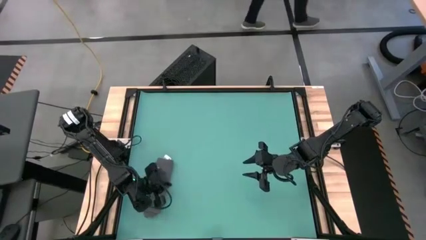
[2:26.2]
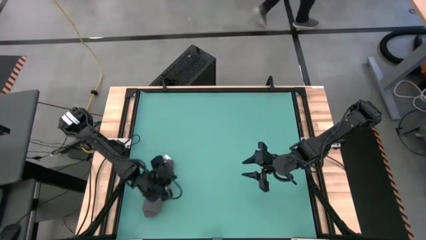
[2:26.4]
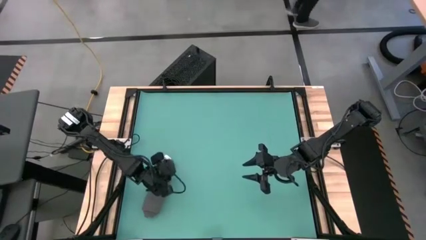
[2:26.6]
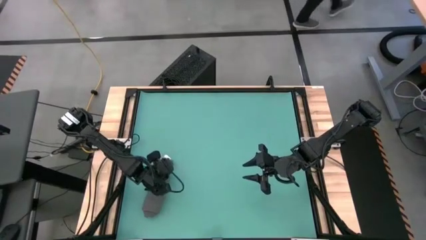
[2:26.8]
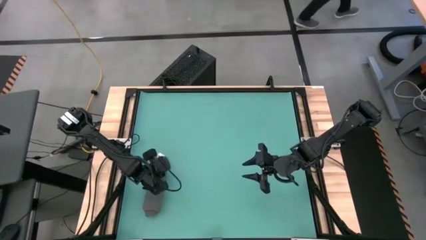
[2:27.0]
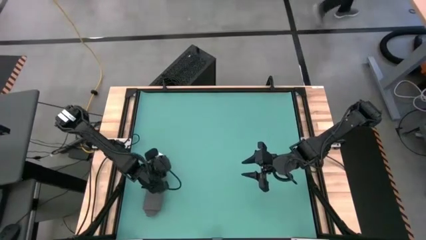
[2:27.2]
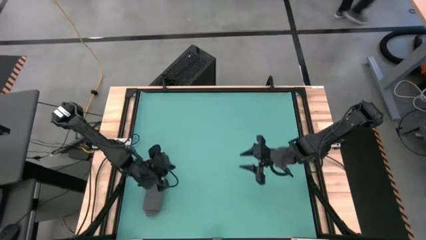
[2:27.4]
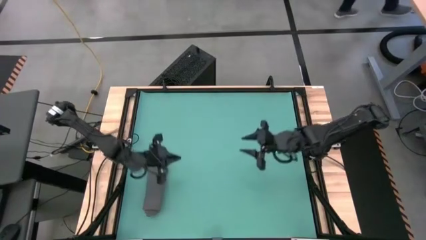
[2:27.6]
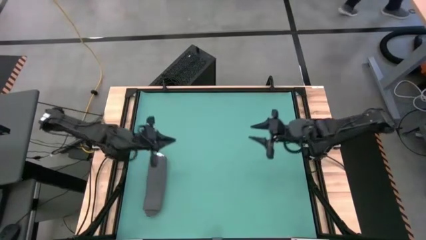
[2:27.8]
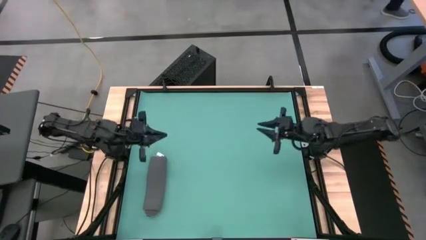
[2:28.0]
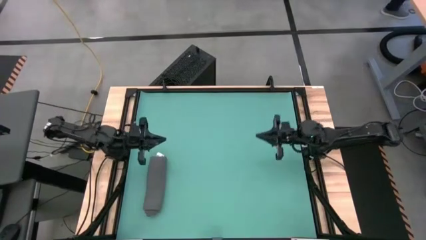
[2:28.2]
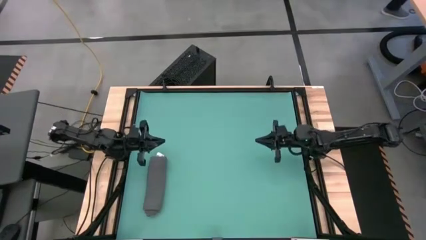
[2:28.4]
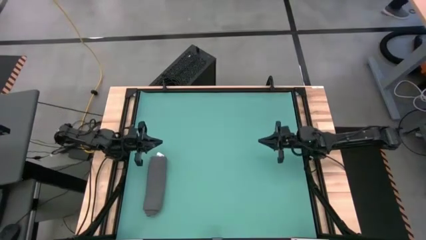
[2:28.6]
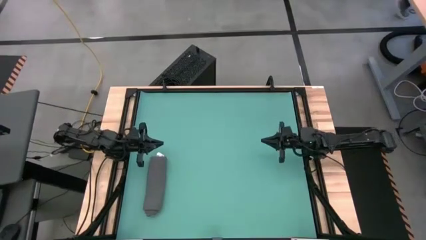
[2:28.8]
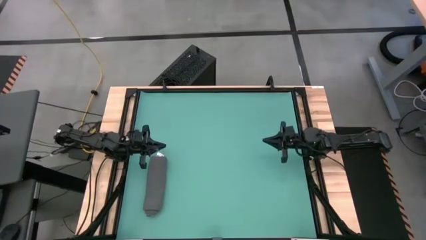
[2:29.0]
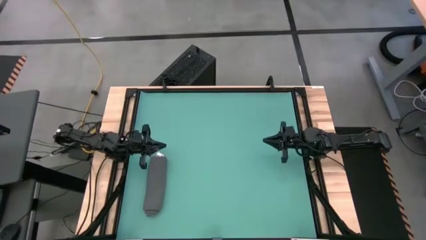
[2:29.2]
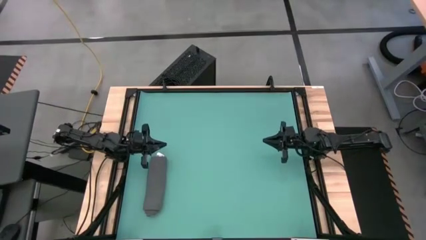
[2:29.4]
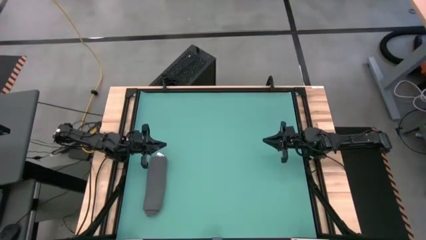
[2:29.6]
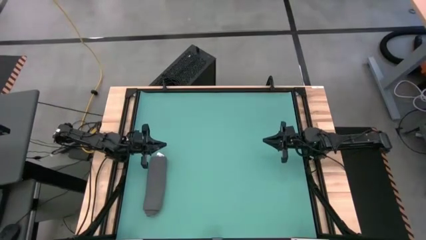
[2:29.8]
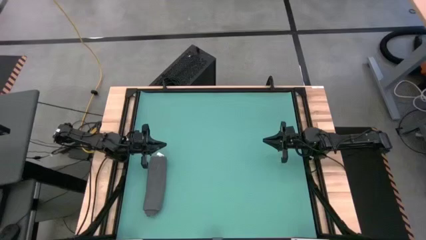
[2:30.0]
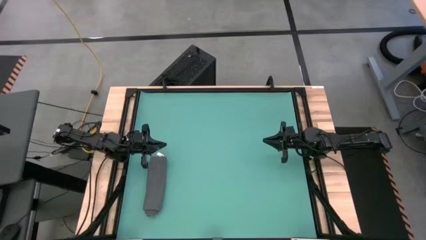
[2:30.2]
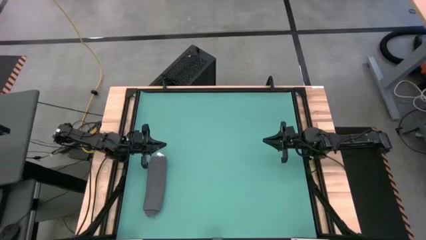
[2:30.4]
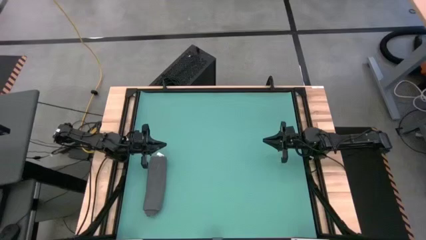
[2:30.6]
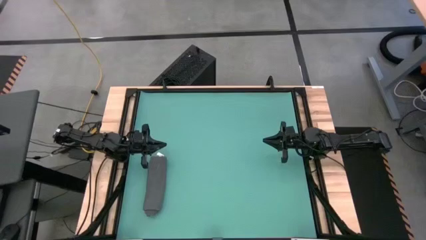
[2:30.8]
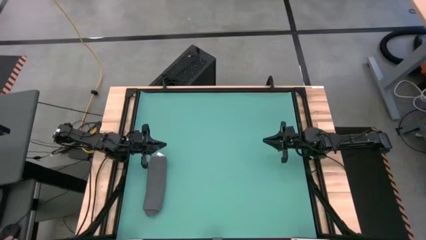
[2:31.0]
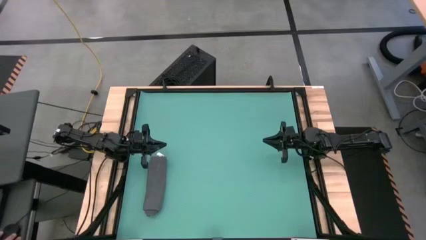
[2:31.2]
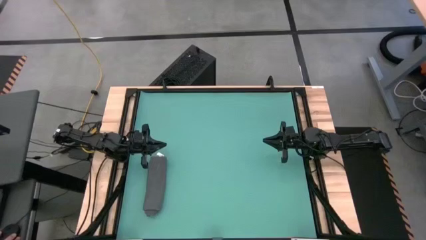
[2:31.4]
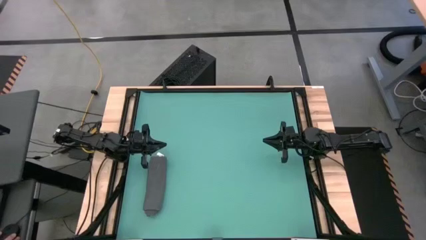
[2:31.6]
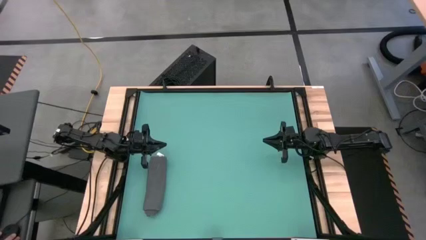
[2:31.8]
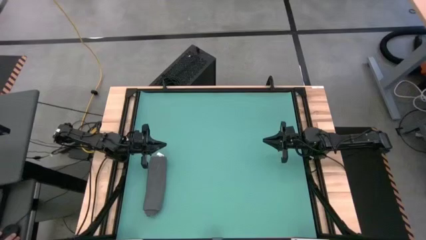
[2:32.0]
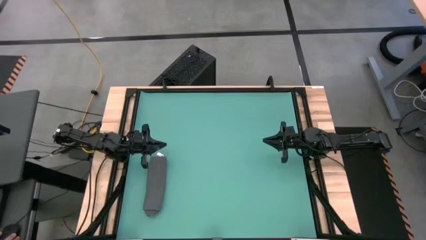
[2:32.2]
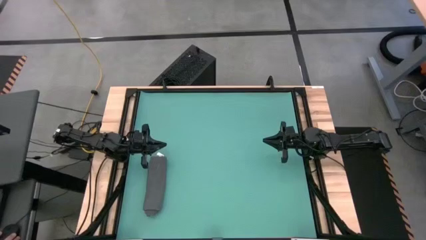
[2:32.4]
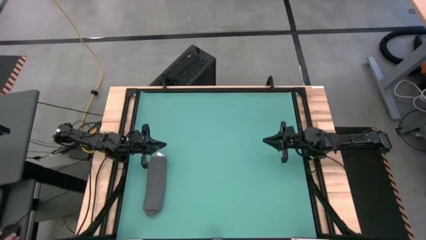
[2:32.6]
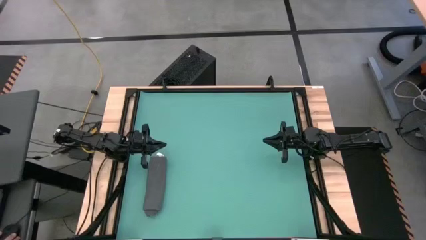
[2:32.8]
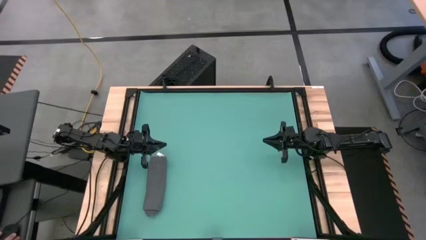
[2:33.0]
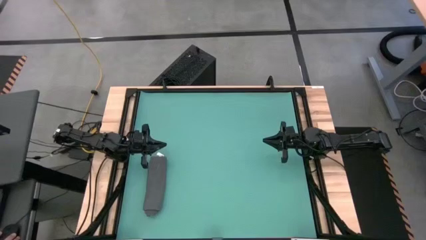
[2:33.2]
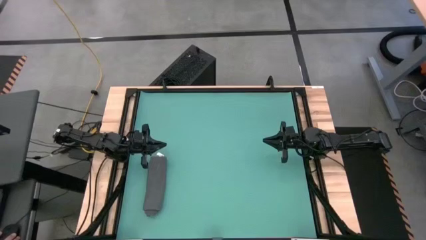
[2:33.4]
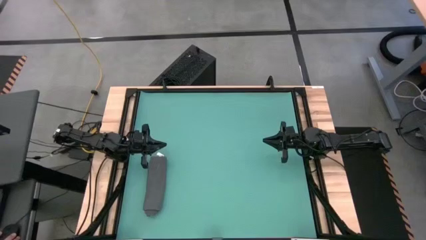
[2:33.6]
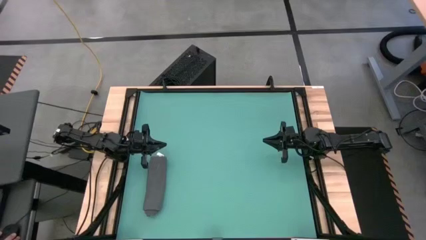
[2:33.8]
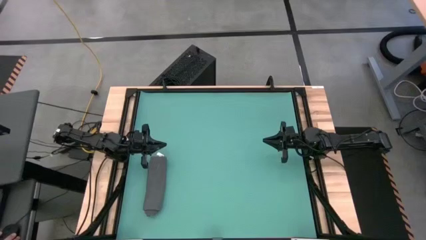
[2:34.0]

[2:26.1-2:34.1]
Task: Roll towel into tight, uniform cylinder
Return to Home Position

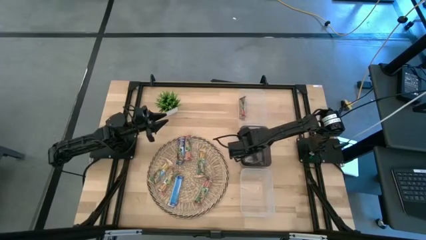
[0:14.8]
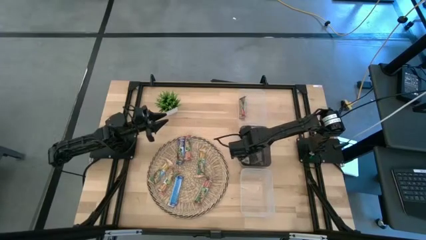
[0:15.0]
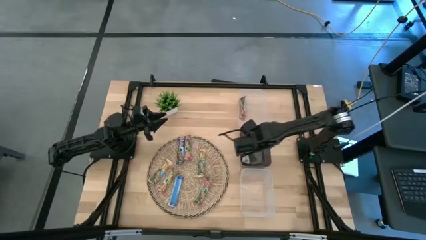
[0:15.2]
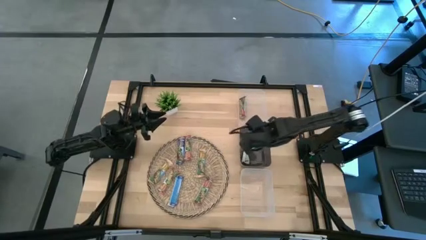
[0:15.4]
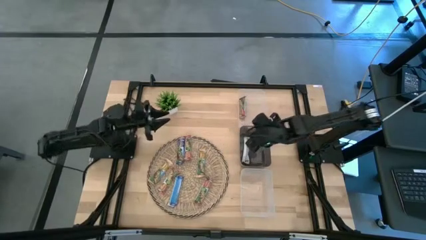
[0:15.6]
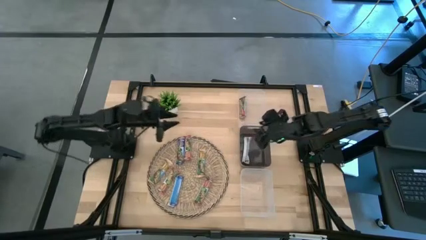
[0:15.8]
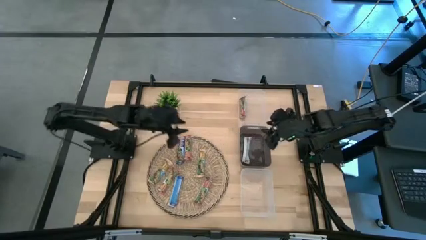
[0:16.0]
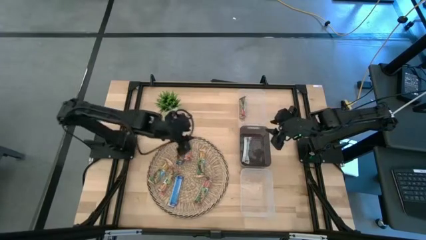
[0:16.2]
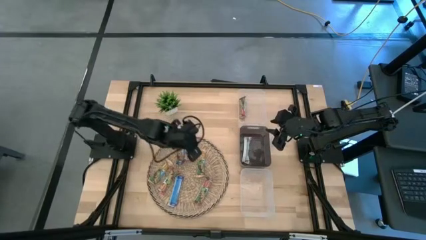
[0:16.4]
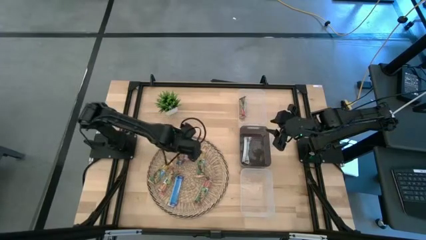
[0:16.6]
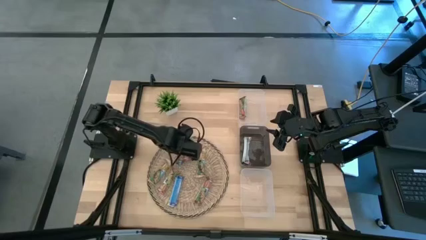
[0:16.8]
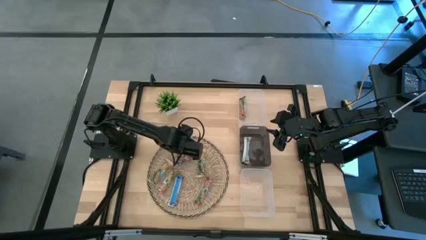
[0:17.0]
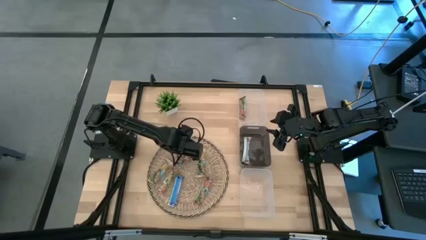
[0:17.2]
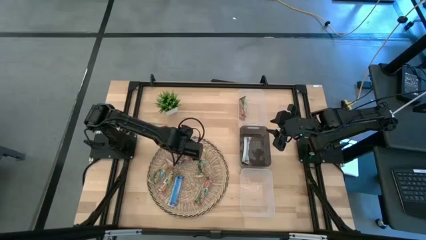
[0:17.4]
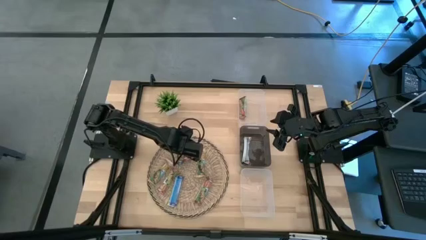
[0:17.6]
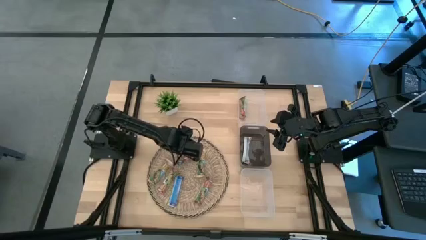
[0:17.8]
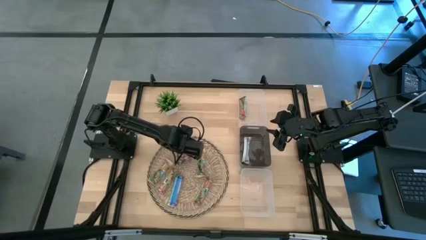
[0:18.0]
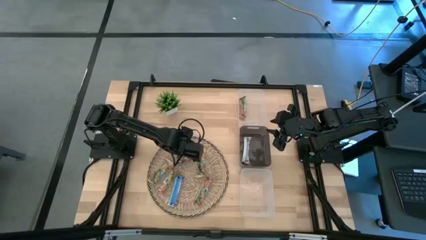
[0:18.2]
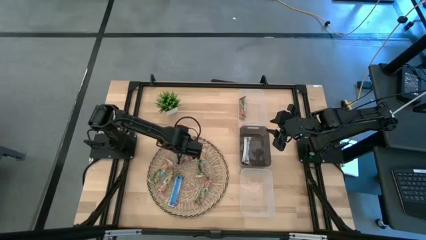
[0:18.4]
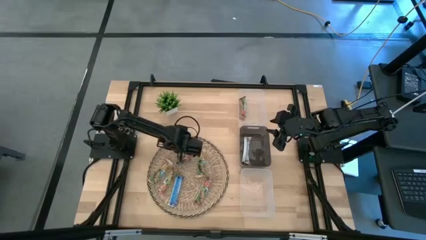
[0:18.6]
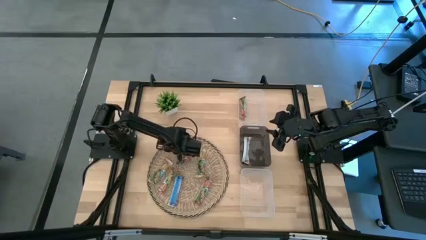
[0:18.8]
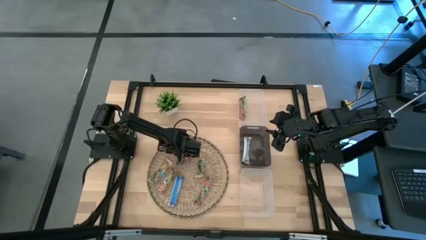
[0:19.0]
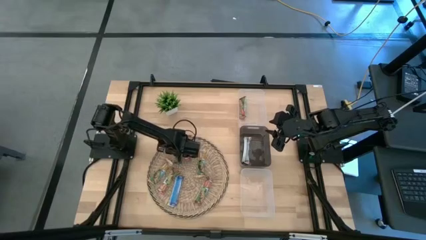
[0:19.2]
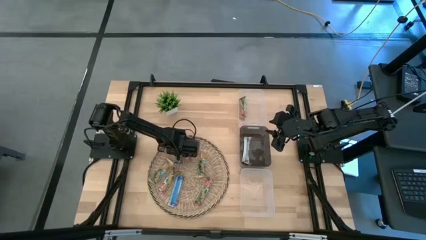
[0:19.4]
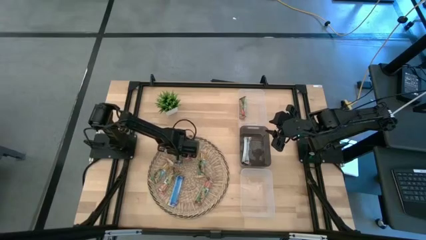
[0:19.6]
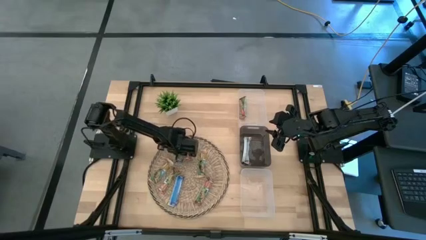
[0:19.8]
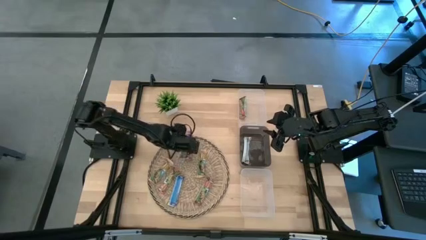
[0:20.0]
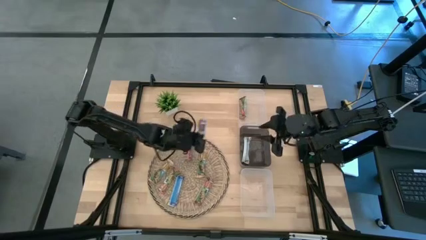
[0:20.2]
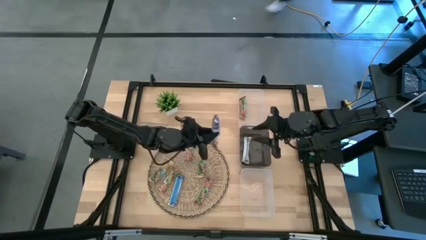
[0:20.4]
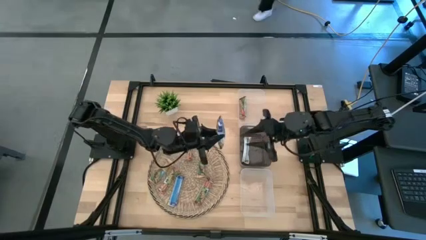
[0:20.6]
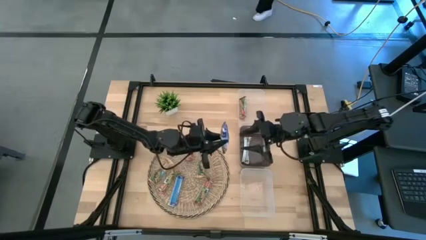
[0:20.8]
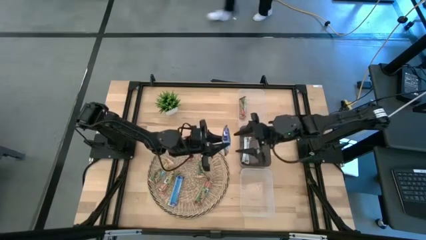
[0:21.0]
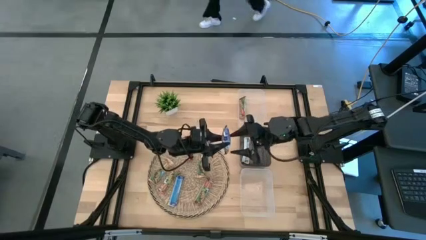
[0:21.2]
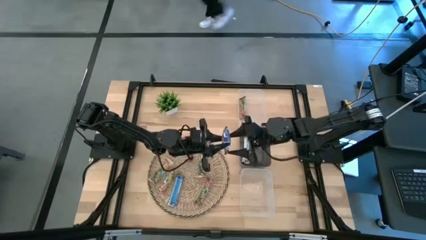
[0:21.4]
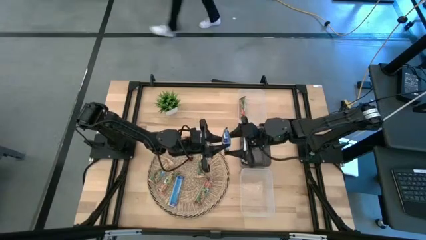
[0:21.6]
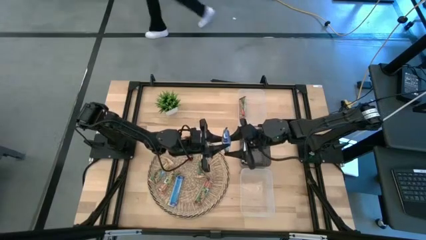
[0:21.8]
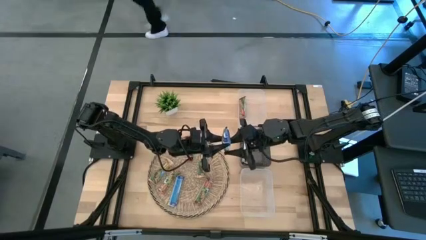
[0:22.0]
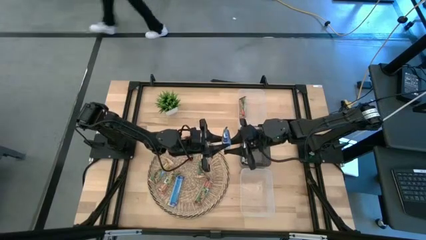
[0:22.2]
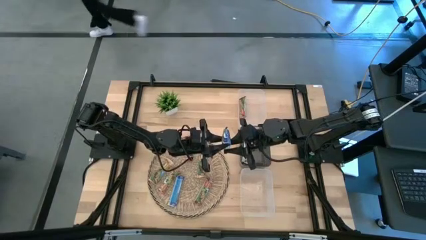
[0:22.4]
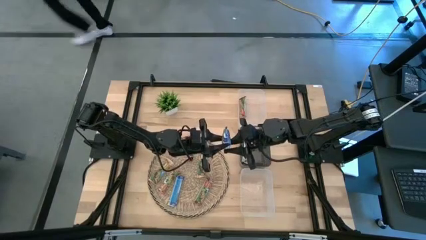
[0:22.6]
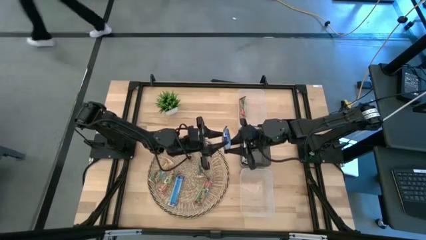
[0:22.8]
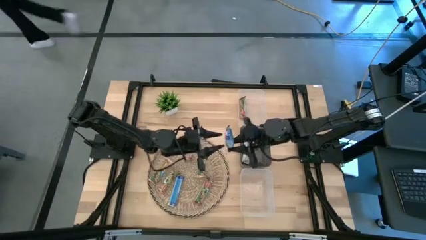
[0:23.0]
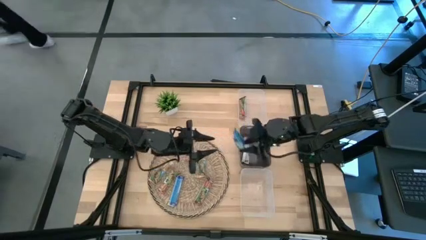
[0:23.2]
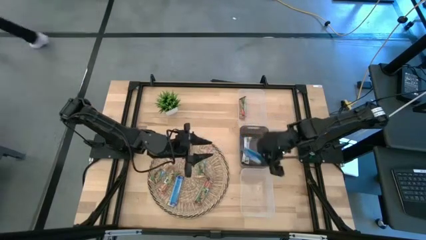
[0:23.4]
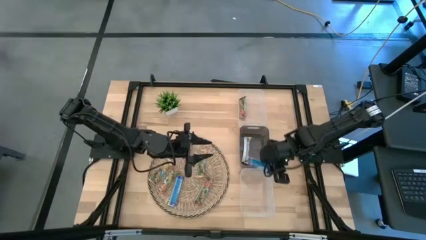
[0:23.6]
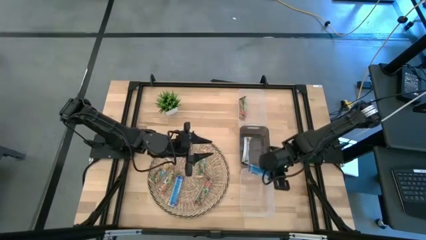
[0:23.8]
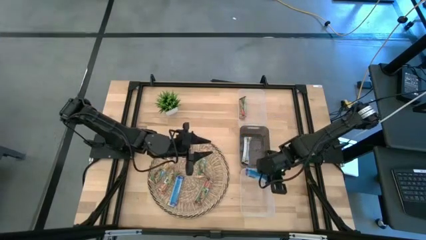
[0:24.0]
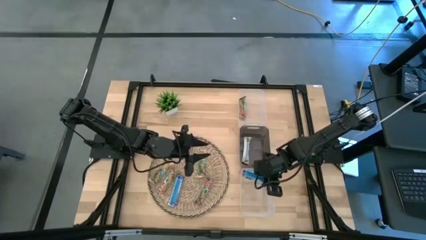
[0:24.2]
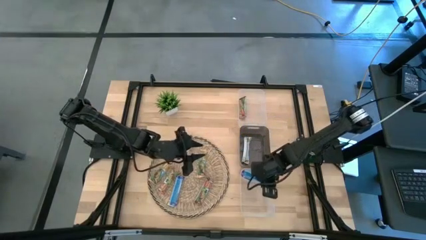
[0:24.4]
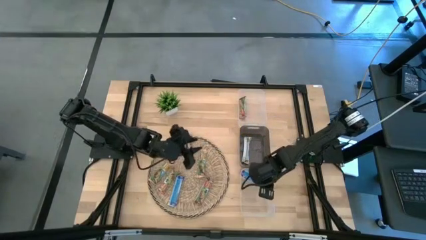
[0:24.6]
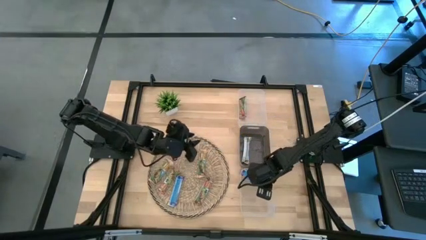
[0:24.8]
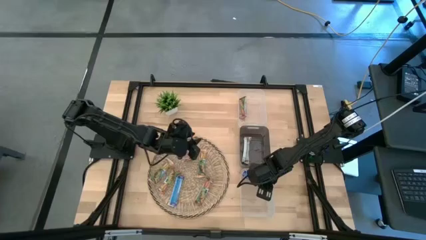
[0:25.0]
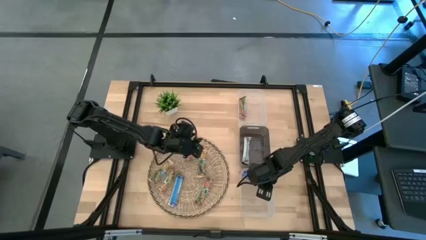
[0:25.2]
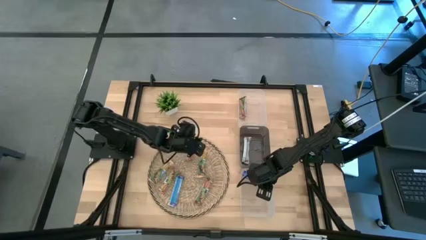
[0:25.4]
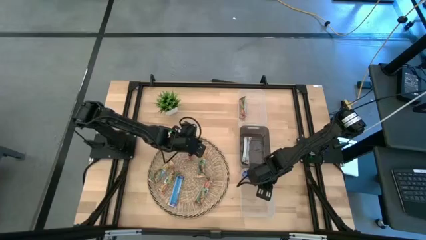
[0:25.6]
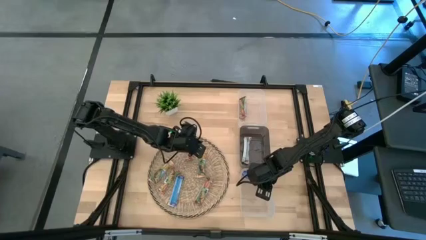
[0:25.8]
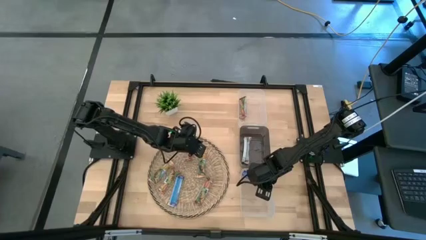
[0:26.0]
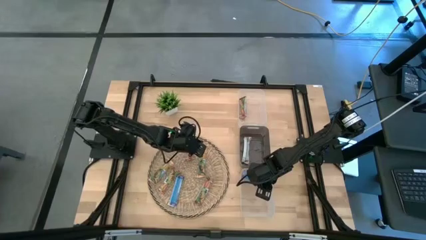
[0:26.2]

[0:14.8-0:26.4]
Task: Pick and place Granola Bars by type
Put the blue granola bar into the bottom transparent bin
